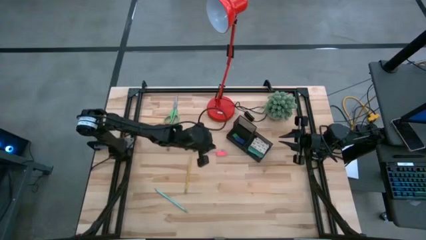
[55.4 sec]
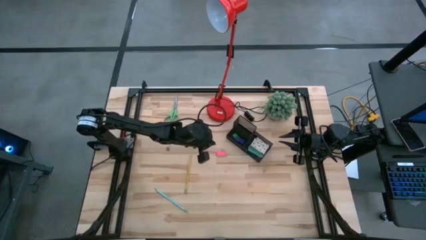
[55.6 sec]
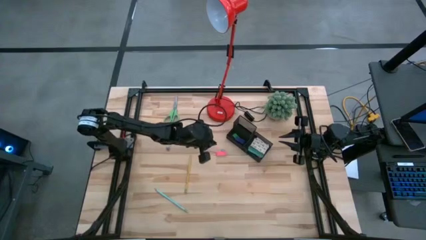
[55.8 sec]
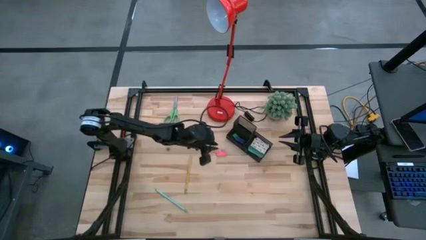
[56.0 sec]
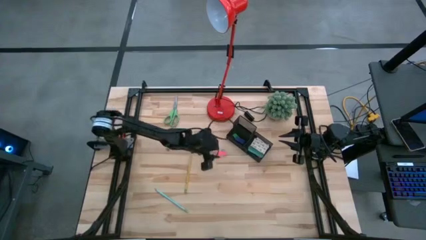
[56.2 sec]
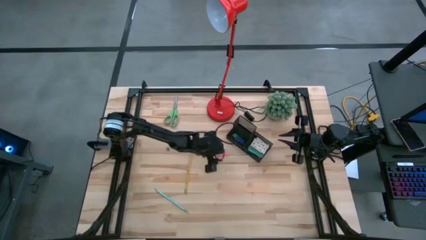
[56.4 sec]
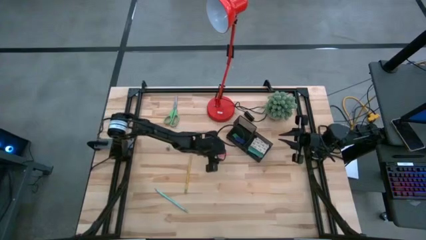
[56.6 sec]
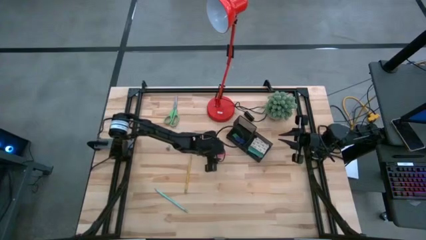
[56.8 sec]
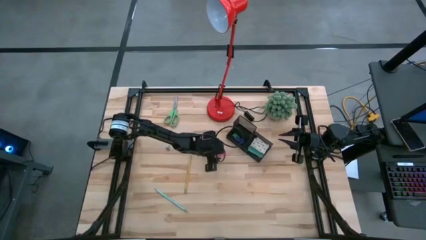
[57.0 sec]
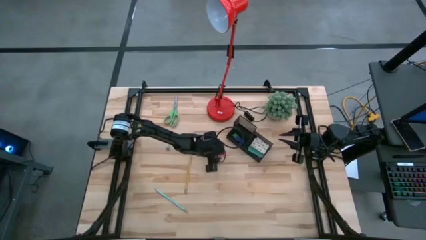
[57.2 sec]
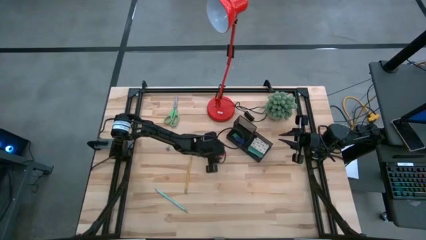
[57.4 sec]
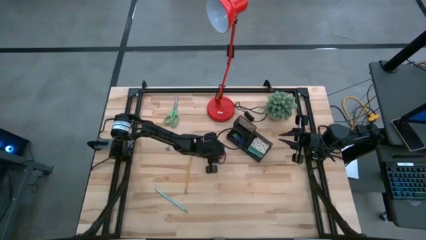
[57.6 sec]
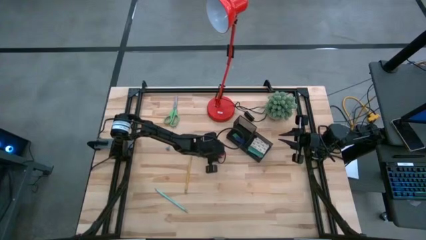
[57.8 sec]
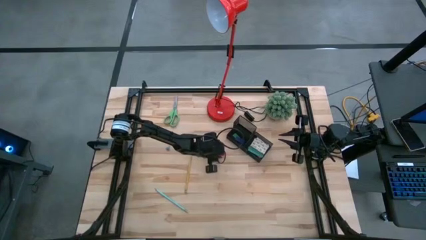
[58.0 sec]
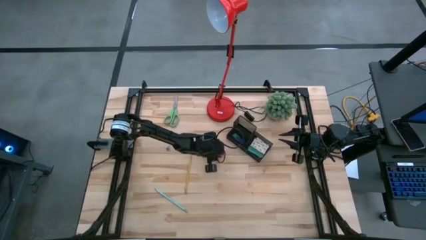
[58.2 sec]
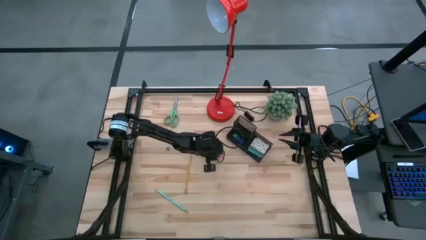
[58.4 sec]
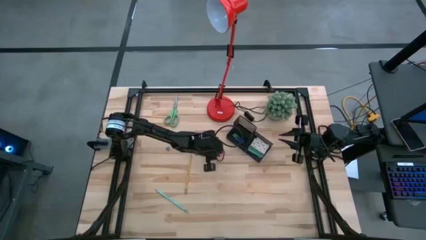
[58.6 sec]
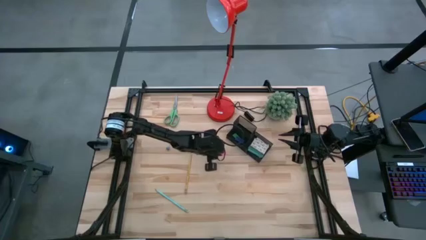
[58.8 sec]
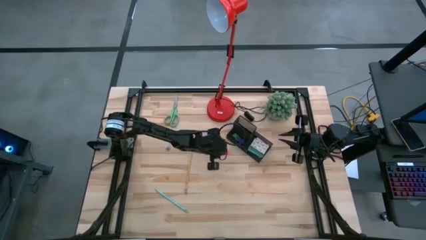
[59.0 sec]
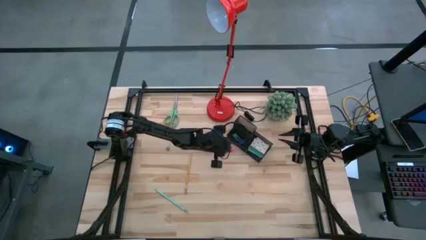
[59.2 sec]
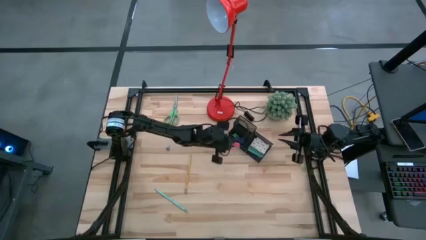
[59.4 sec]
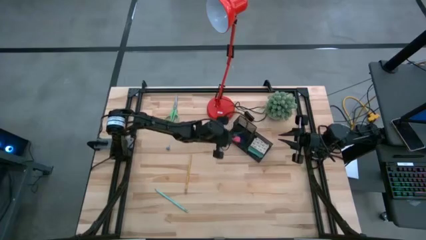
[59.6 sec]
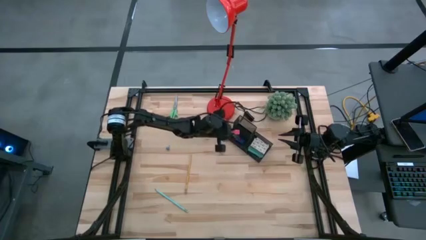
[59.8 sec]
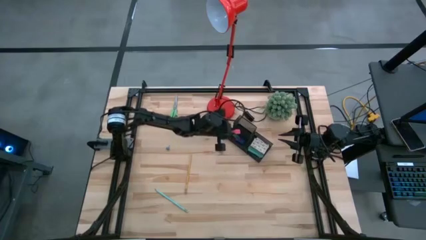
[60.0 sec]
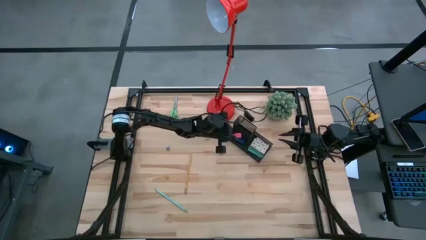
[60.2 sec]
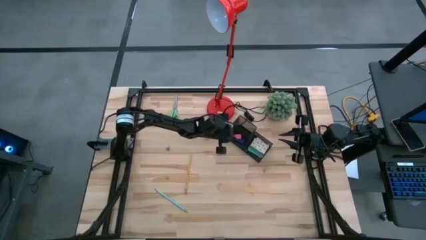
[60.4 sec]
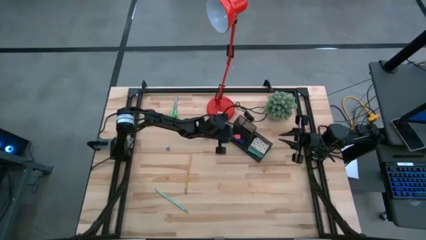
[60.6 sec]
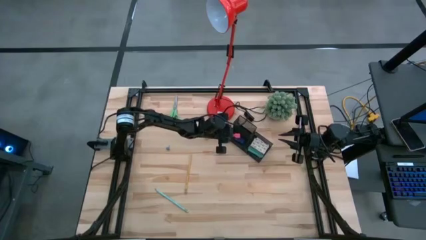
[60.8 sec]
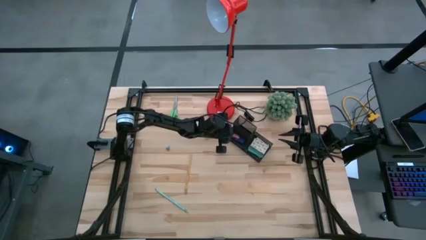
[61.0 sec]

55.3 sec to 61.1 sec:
Task: Pick and place office supplies into organizer
Put the pink eraser into the desk organizer

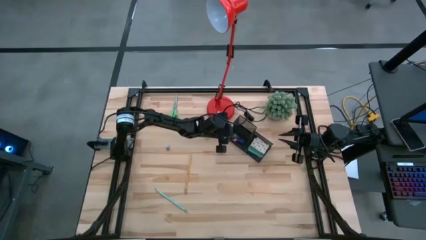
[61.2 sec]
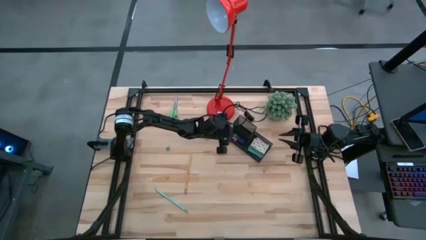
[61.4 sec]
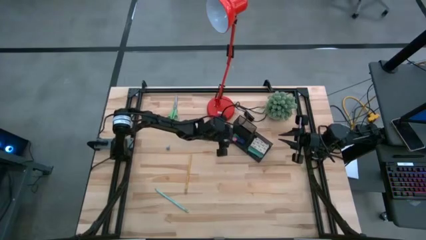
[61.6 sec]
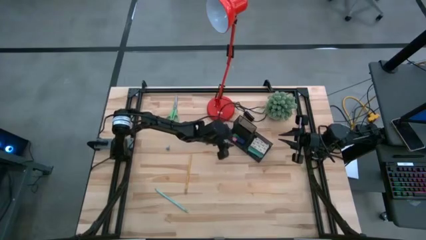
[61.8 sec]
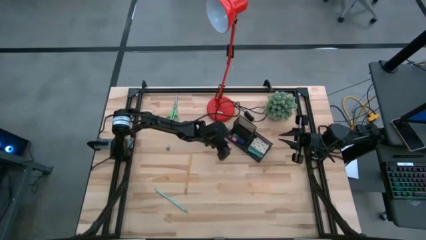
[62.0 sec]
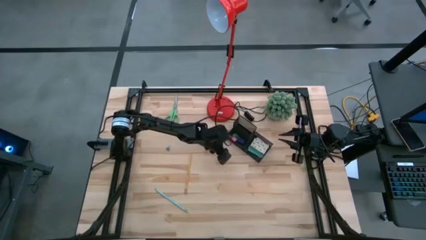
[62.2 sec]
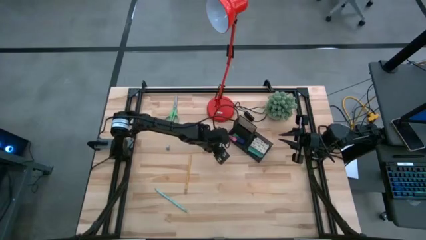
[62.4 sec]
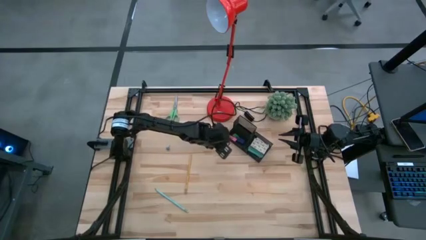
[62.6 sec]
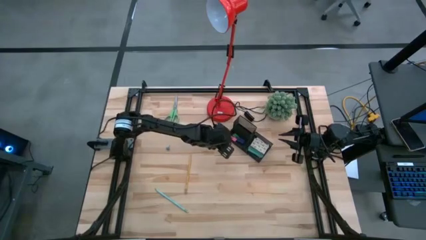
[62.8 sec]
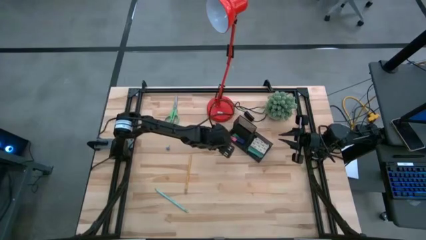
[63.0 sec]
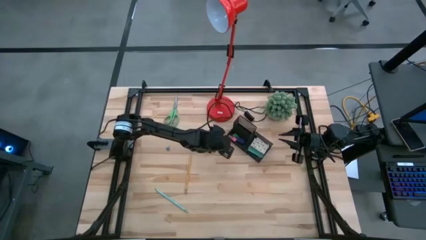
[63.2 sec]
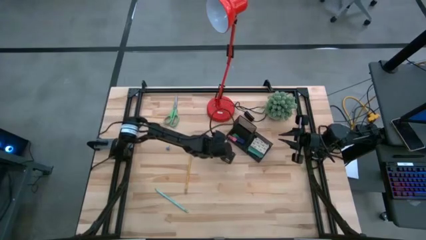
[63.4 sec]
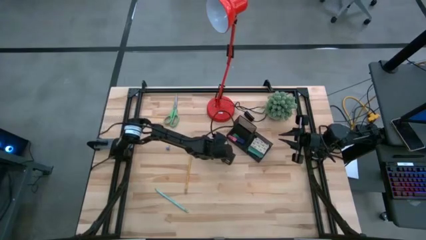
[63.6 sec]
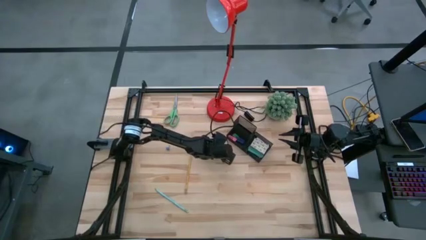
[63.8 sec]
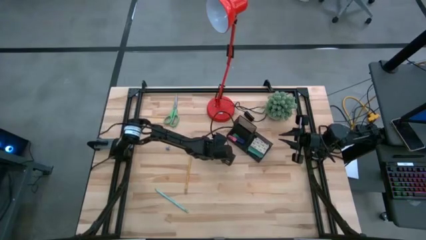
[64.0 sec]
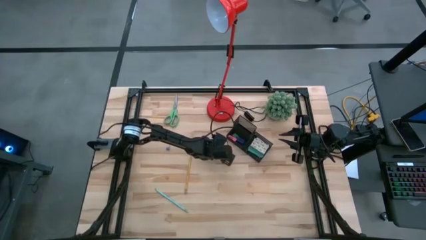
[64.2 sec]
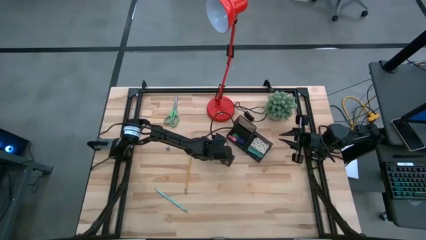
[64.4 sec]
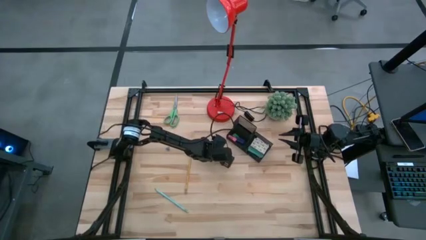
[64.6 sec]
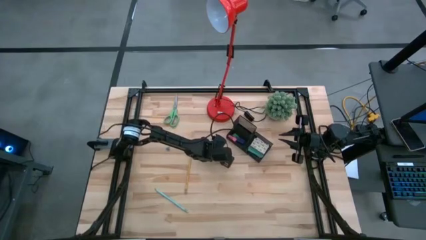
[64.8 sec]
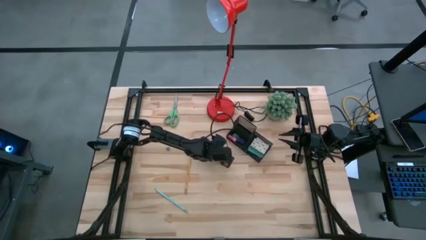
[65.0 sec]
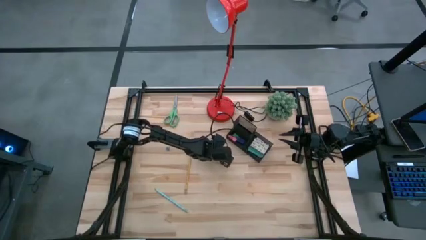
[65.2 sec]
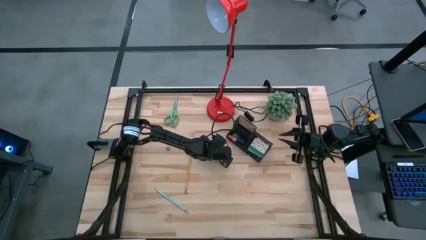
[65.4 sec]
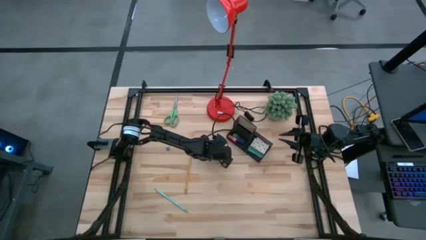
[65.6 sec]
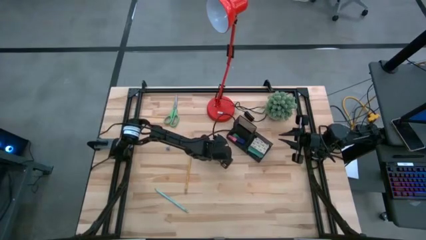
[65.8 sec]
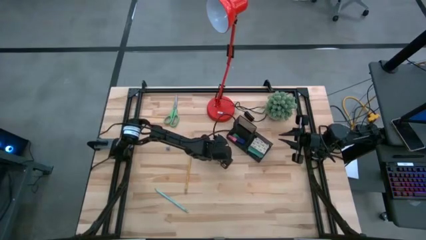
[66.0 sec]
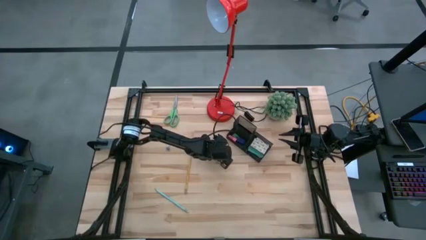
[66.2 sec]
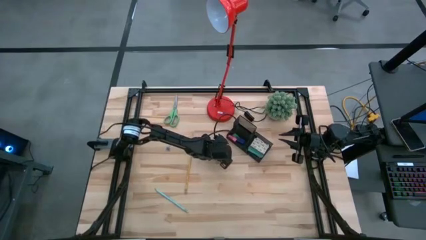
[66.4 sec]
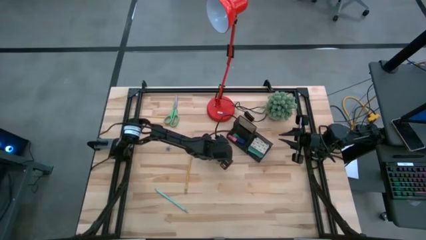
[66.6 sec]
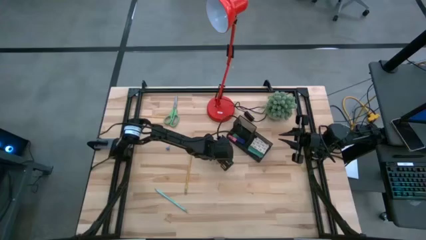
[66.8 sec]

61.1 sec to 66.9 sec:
Put the right binder clip into the desk organizer

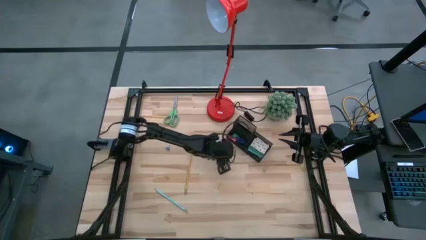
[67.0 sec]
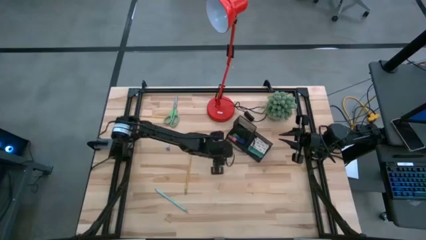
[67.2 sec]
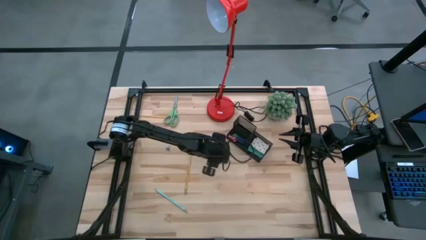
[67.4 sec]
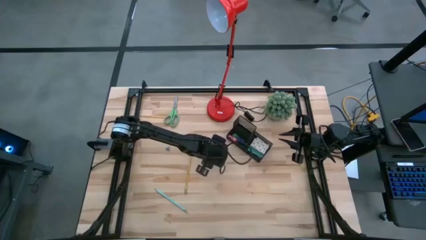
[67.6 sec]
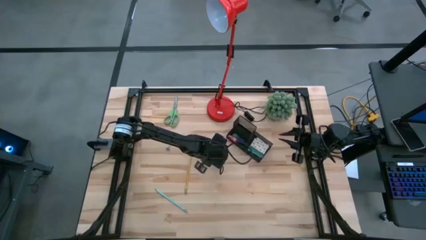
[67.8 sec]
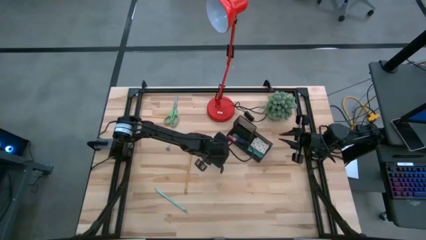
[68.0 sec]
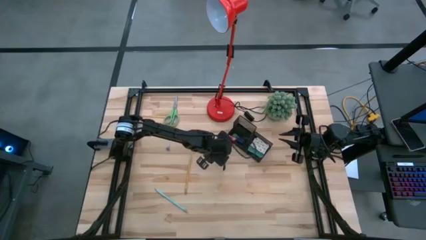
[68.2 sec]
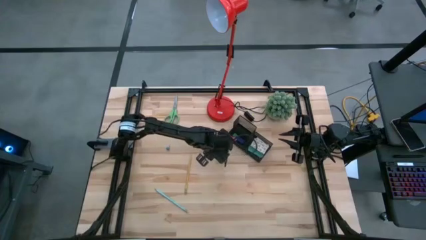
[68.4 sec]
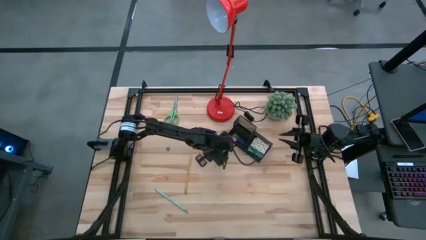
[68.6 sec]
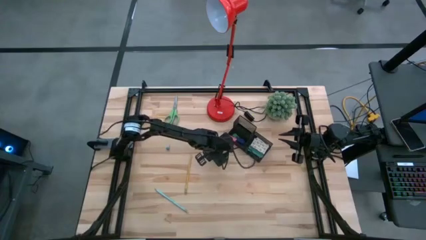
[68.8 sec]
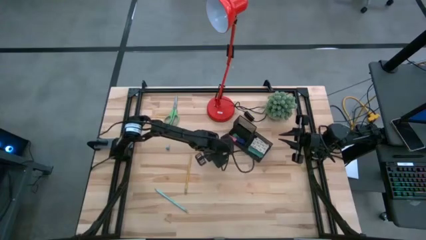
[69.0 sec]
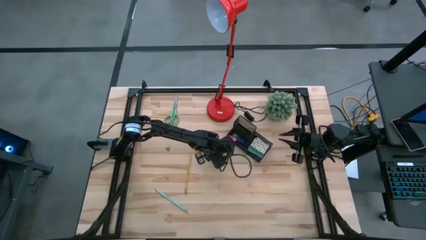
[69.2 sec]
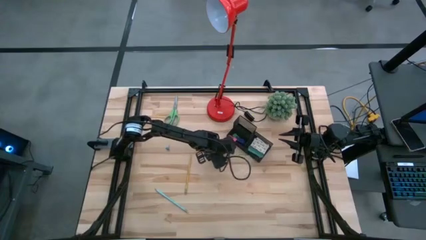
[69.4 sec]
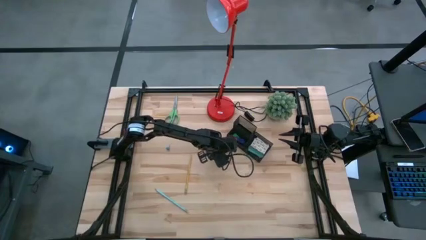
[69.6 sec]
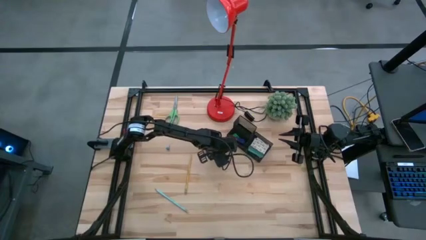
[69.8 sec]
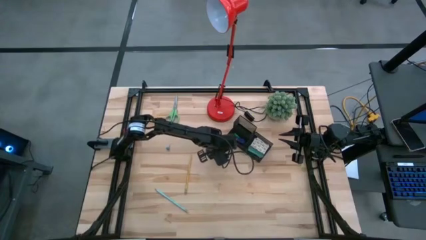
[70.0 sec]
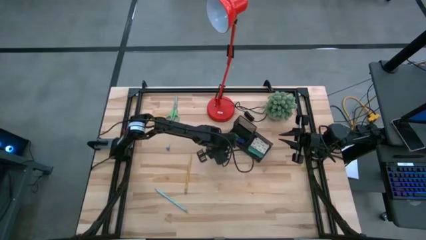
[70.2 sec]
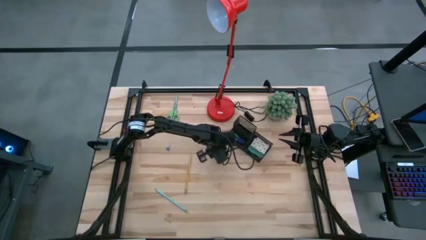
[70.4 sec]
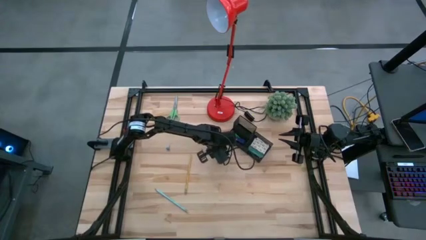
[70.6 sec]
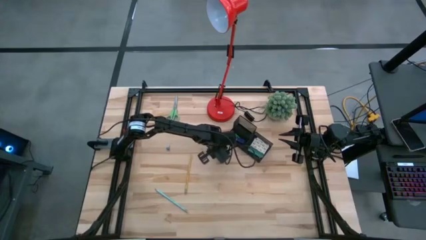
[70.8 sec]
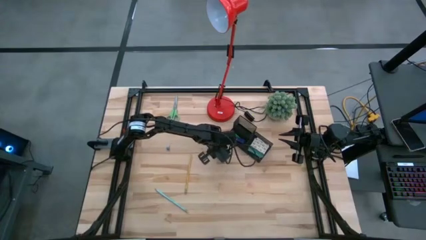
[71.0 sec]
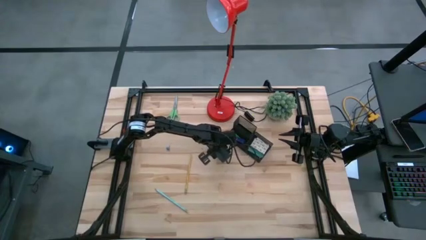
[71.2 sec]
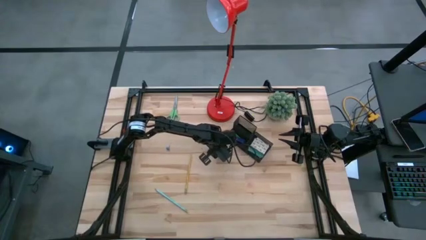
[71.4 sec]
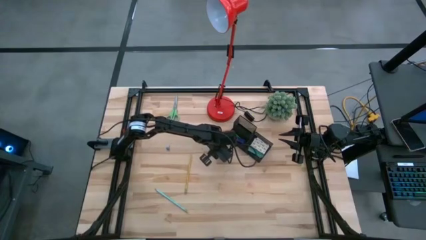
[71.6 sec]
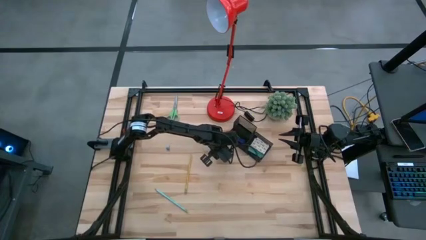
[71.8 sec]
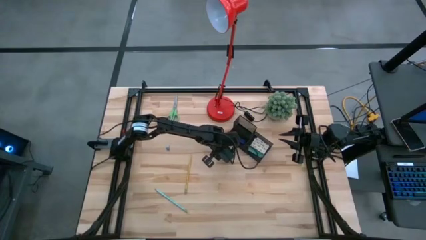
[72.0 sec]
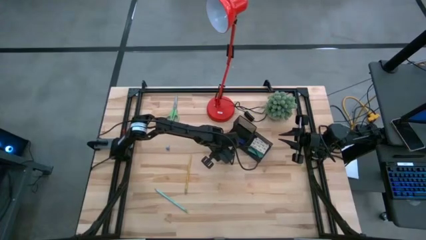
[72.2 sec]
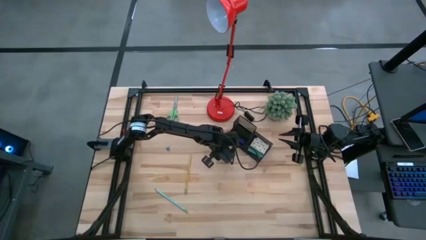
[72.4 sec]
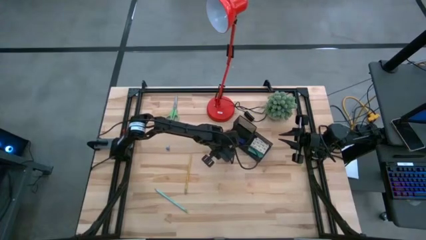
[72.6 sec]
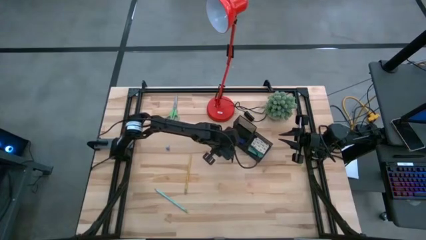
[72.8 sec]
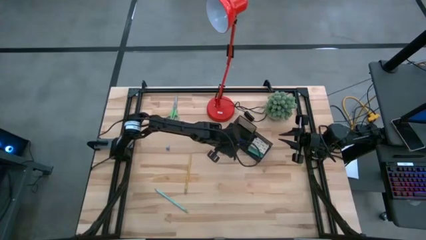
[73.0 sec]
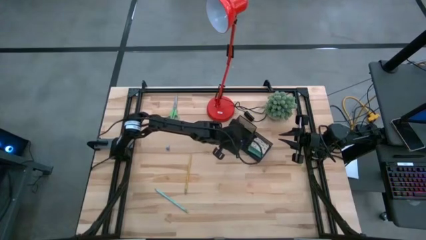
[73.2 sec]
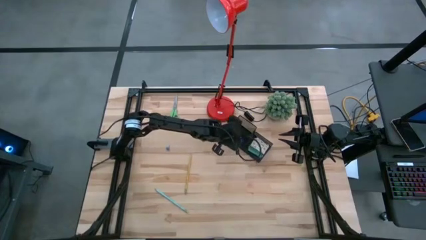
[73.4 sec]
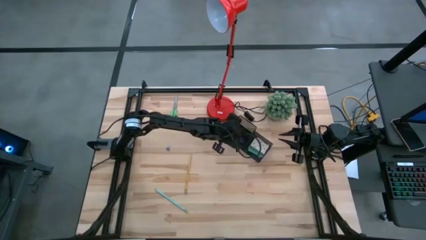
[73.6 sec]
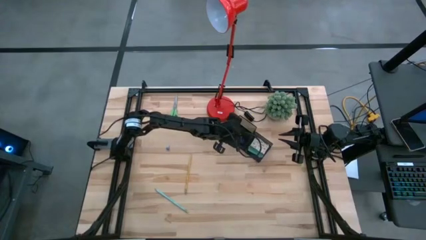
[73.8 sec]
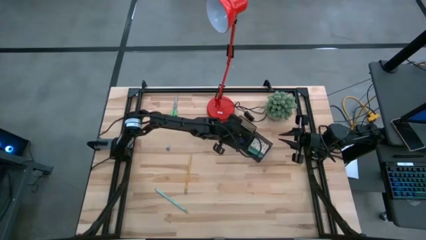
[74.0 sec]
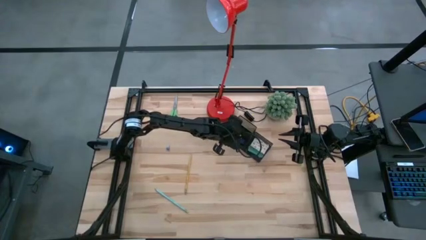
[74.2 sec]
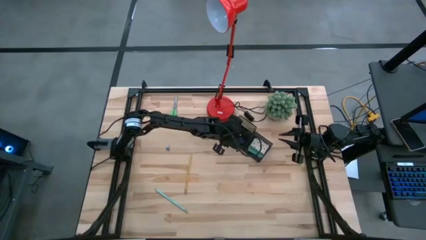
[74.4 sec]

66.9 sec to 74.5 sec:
Put the right binder clip into the desk organizer
